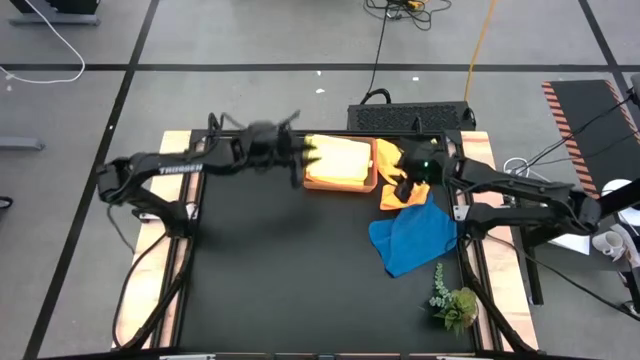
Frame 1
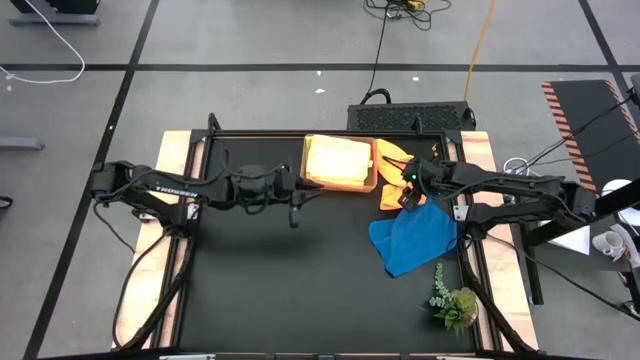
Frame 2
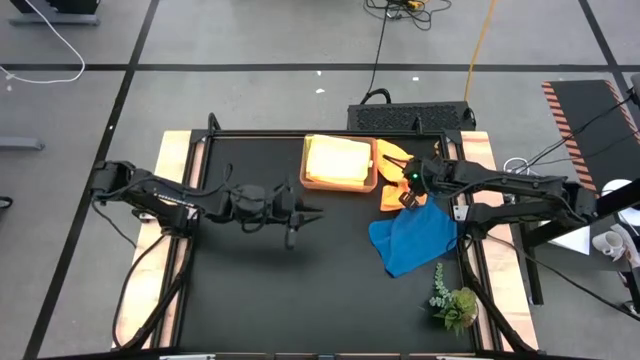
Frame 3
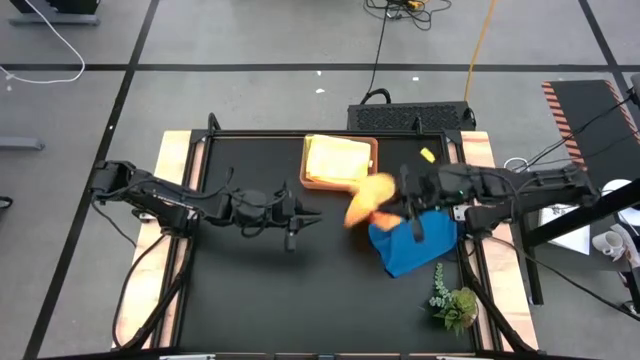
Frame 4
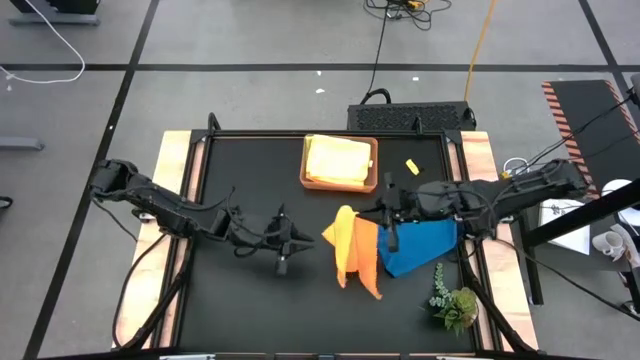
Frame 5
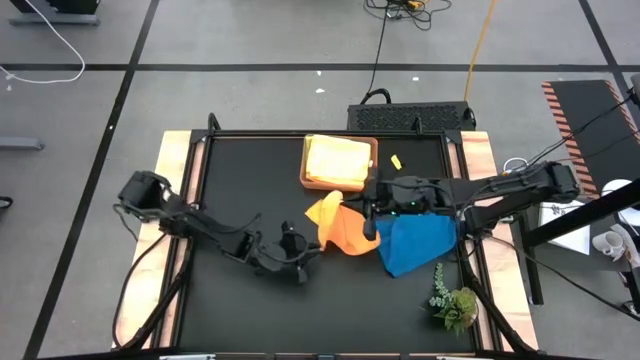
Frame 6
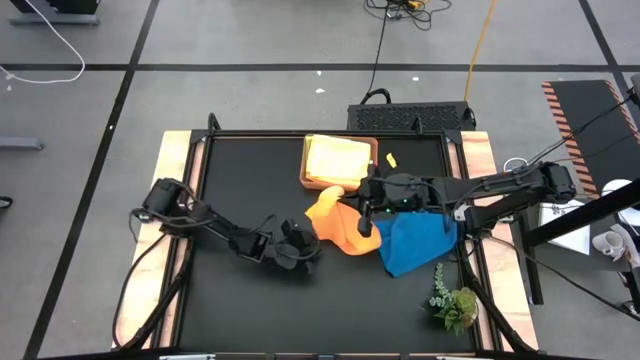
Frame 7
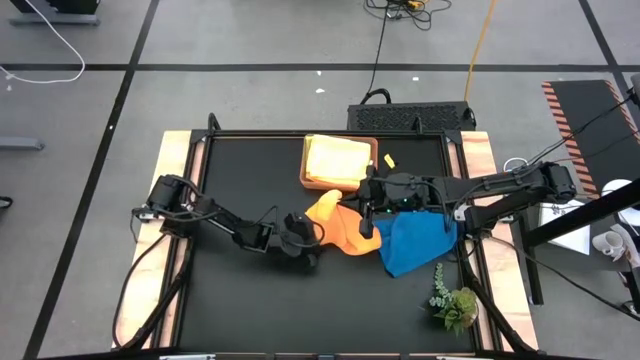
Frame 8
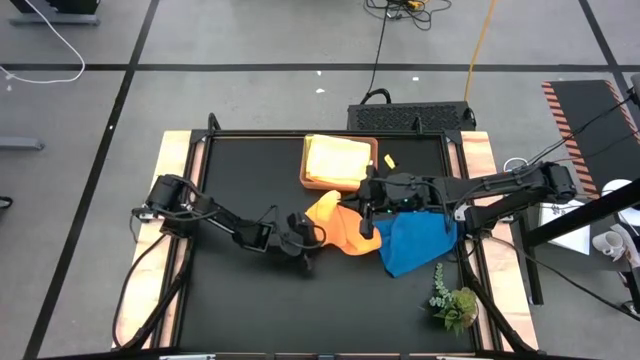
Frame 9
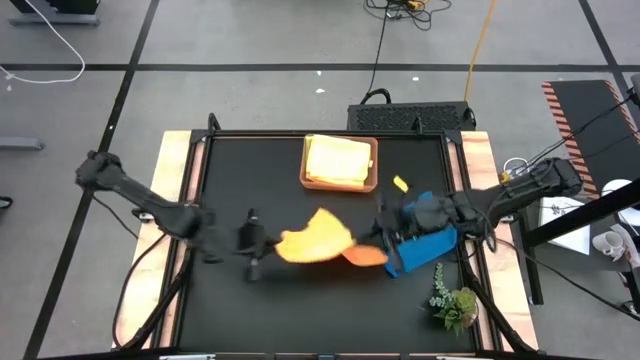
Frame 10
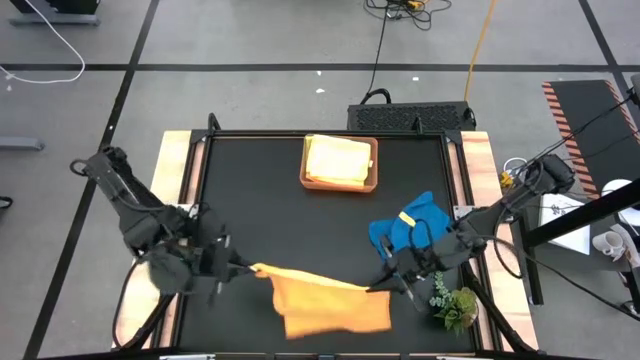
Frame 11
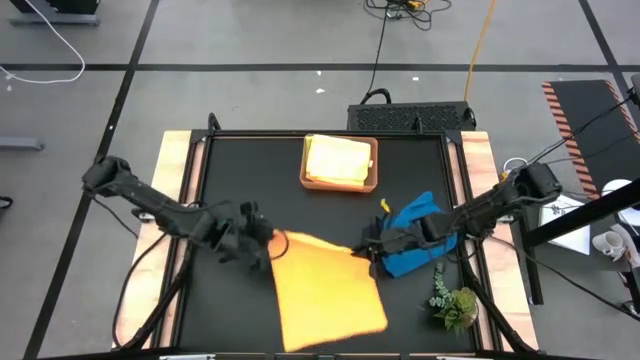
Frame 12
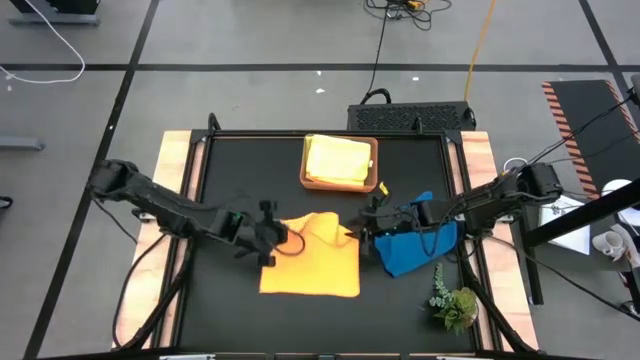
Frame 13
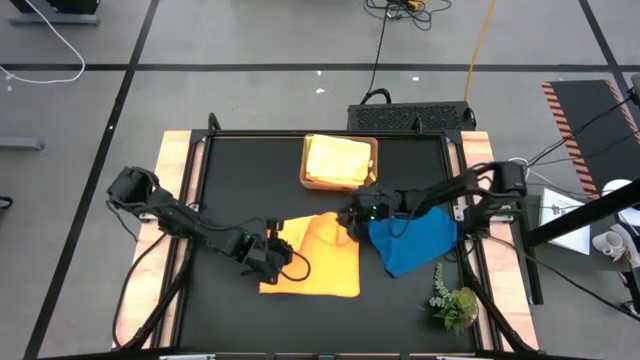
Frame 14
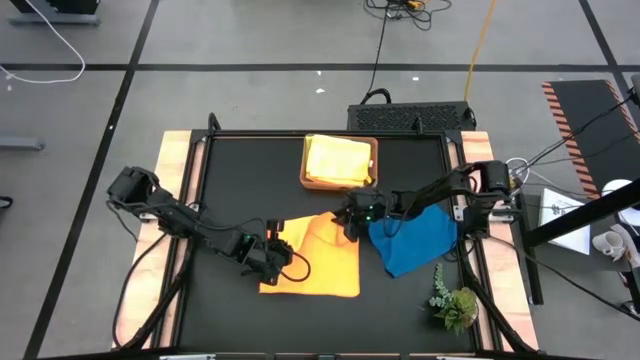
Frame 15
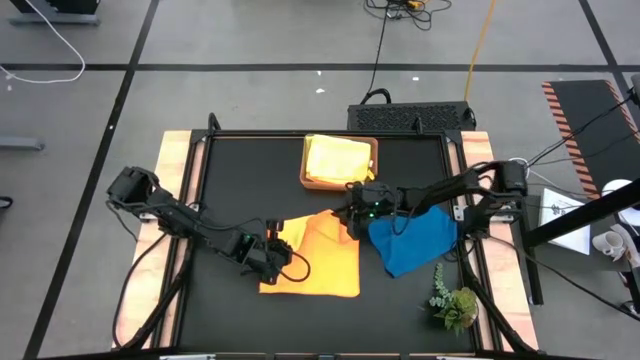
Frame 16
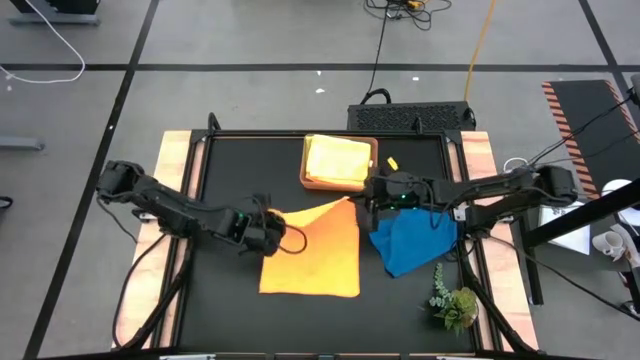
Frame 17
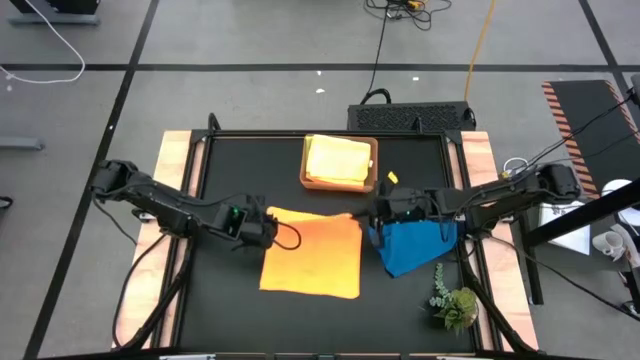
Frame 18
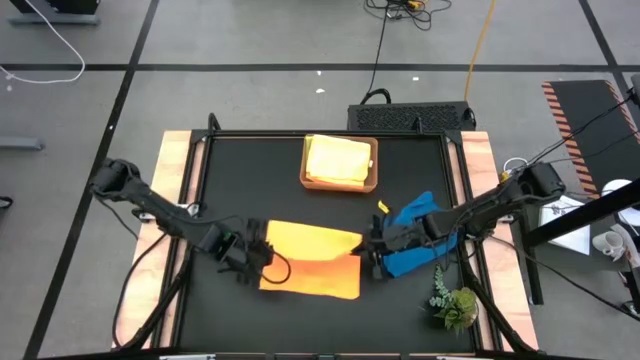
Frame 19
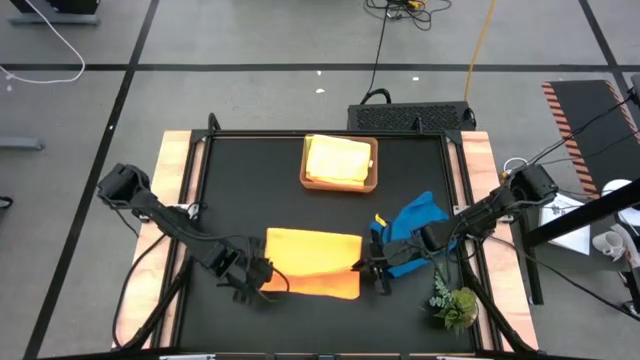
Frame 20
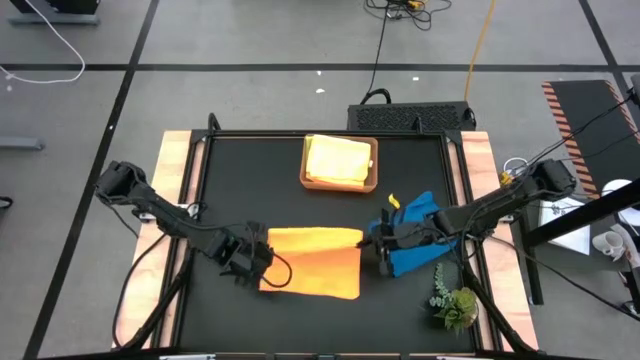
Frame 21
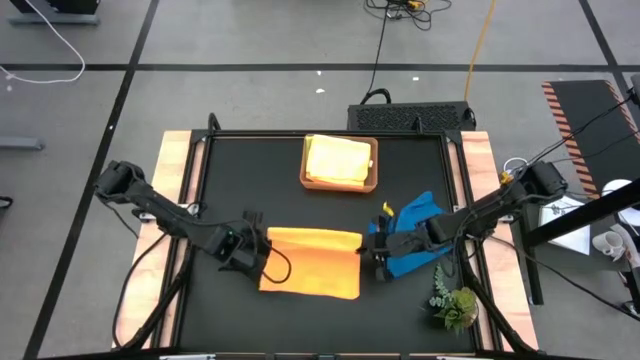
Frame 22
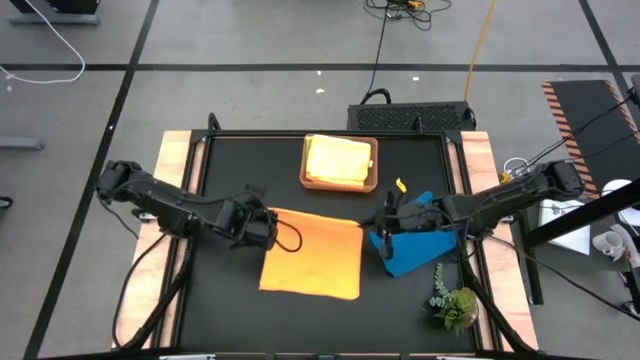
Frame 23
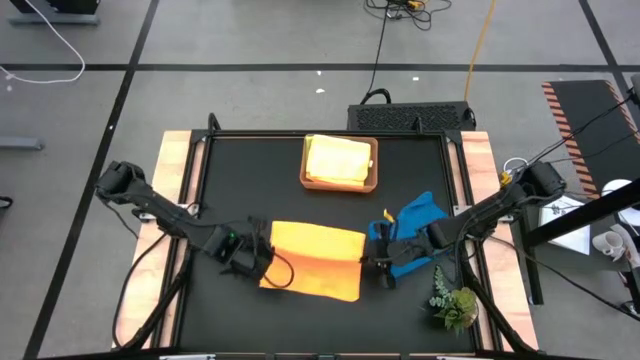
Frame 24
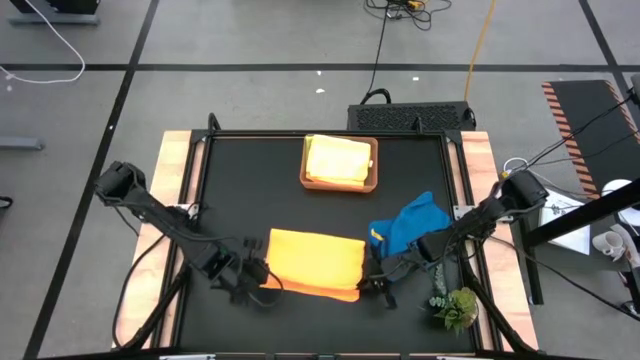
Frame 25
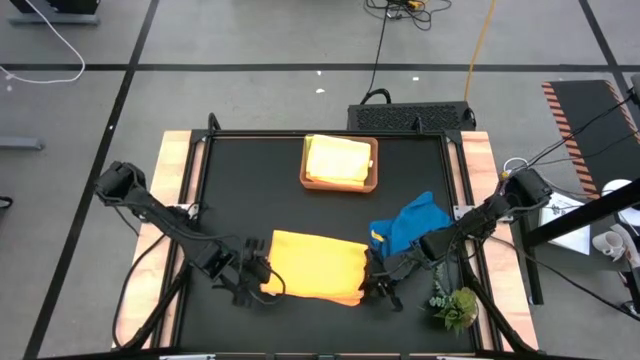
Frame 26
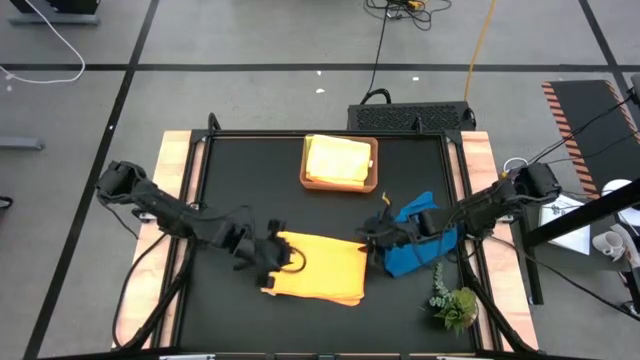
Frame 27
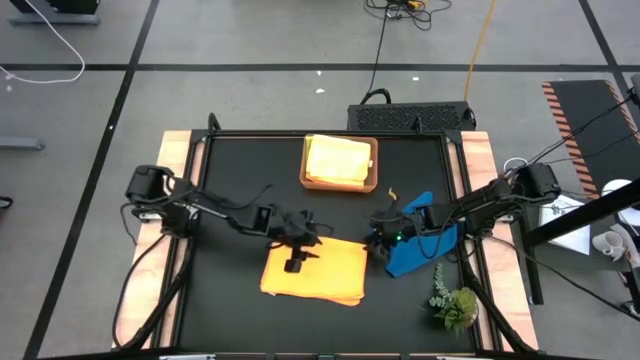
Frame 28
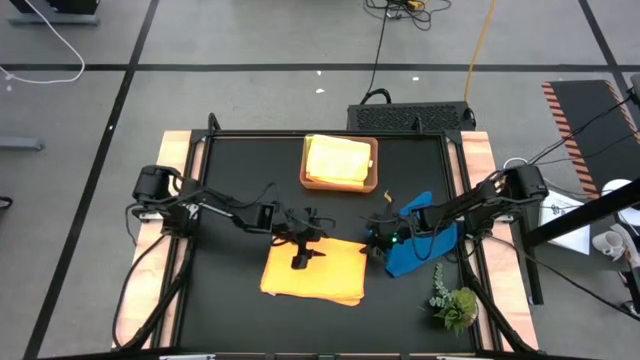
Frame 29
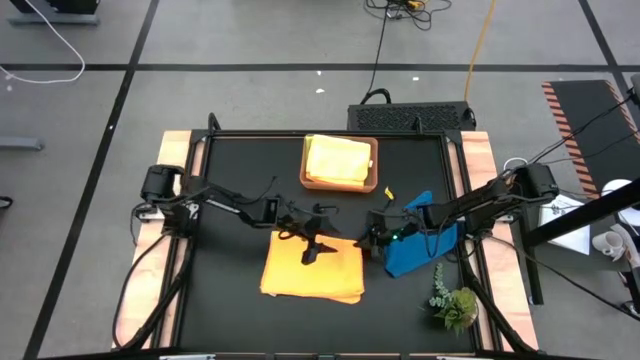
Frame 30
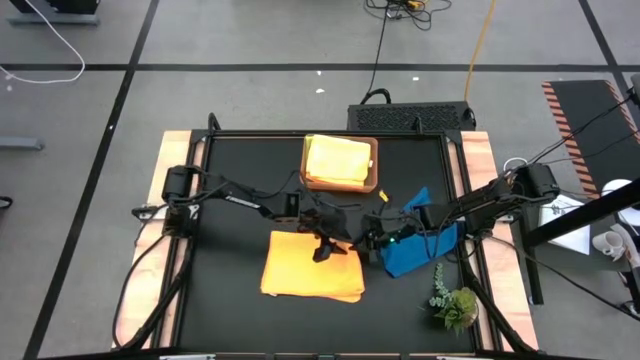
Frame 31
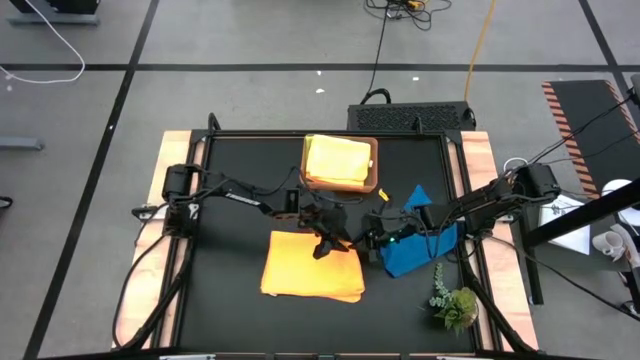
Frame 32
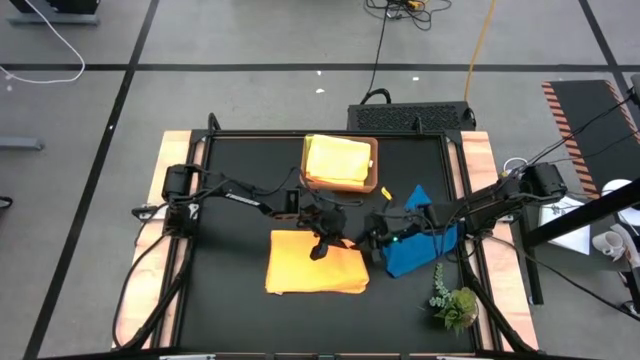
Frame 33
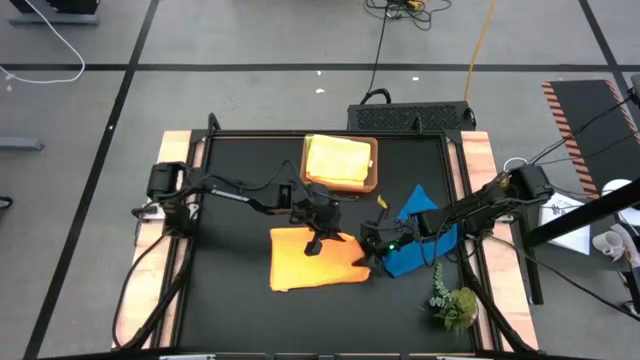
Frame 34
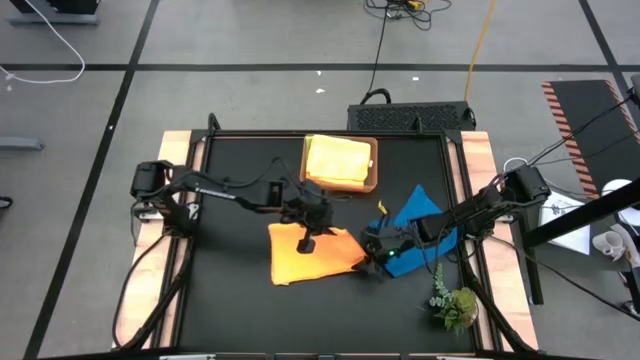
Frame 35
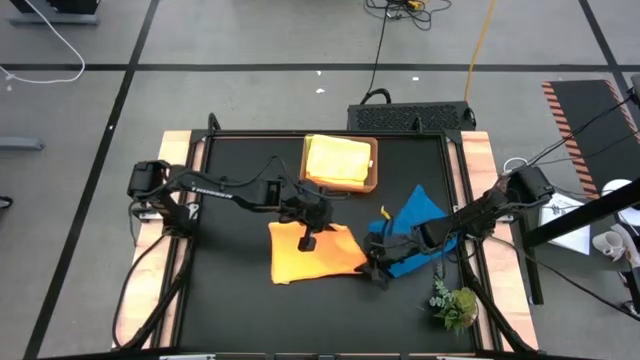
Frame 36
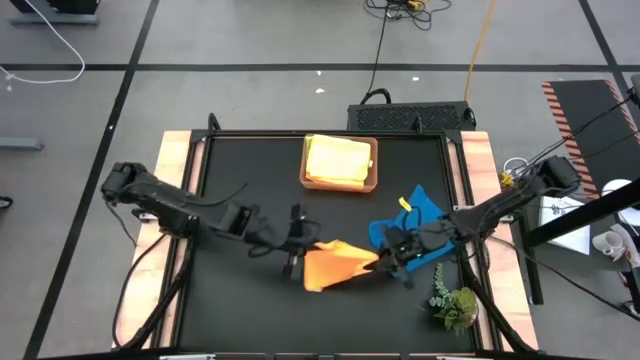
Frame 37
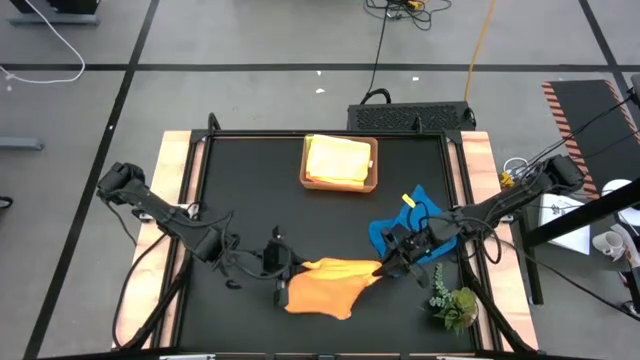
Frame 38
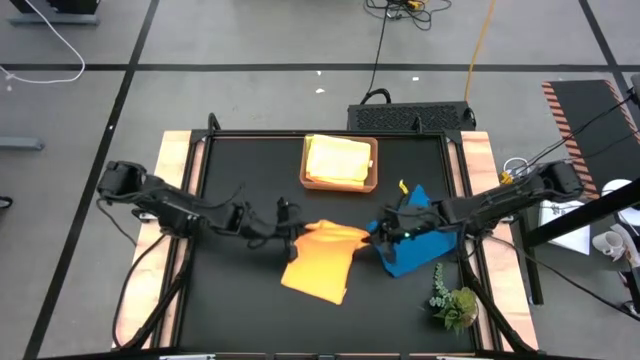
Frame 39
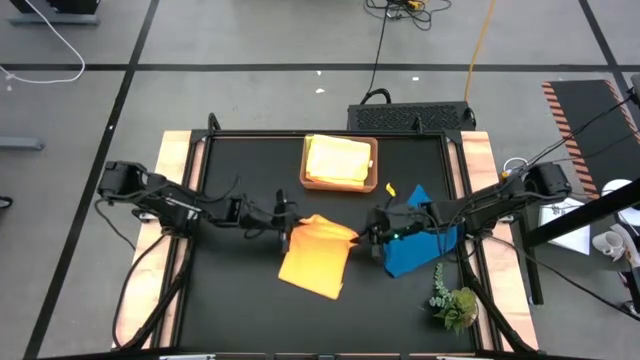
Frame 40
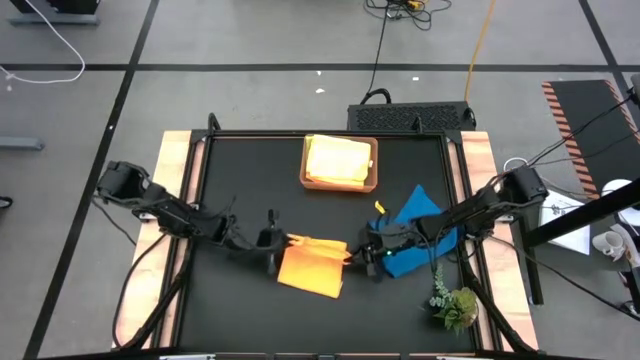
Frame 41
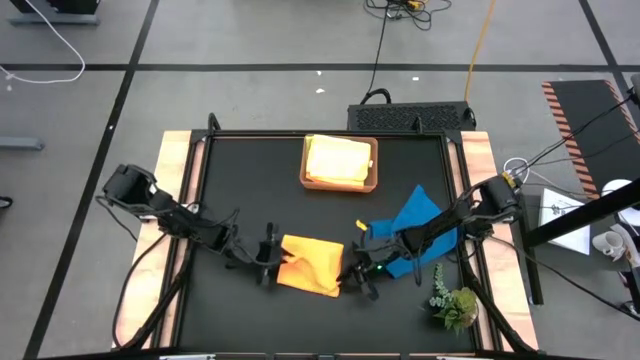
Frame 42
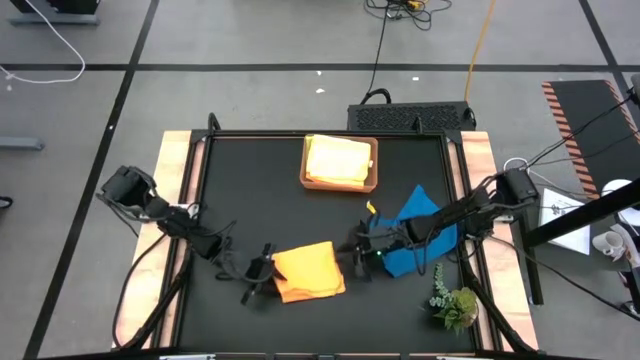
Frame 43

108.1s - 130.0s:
Task: Fold microfiber towels
Fold the orange microfiber cloth
